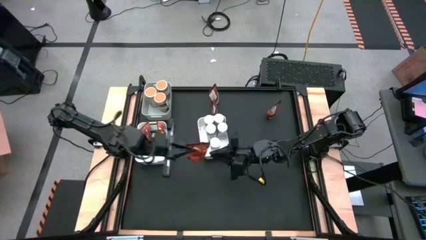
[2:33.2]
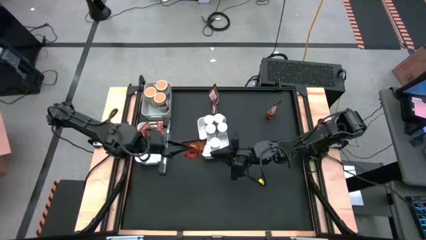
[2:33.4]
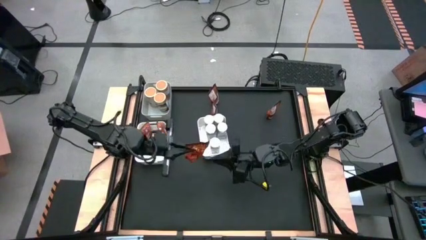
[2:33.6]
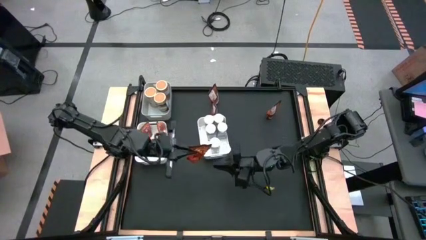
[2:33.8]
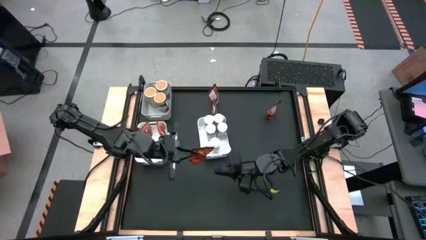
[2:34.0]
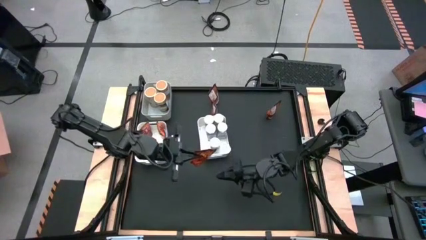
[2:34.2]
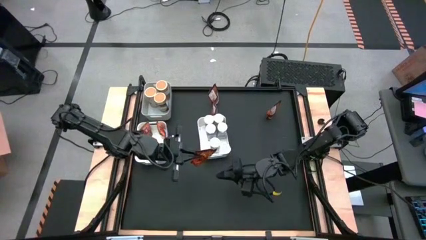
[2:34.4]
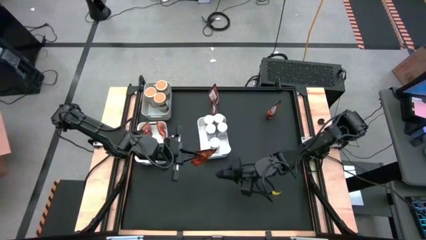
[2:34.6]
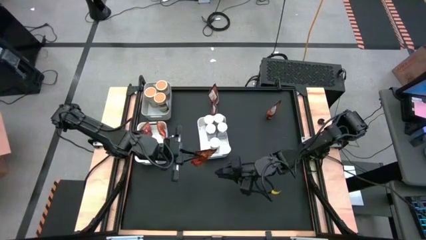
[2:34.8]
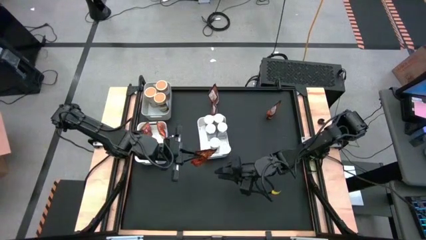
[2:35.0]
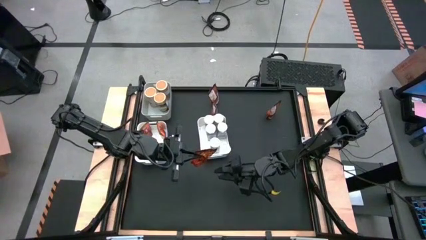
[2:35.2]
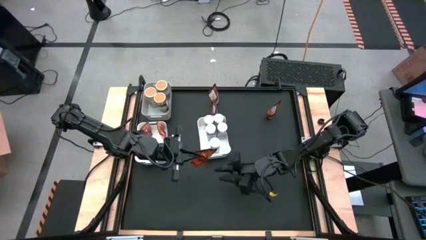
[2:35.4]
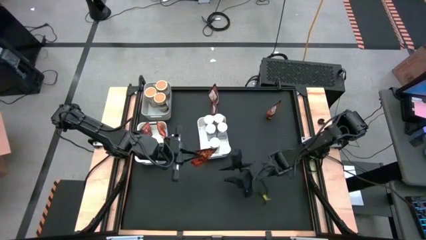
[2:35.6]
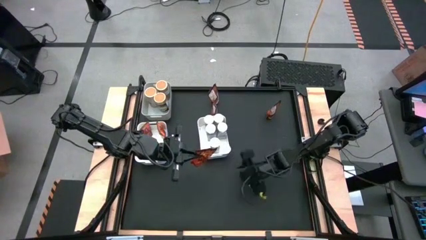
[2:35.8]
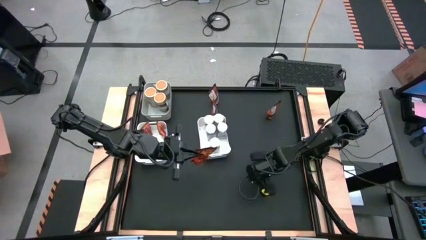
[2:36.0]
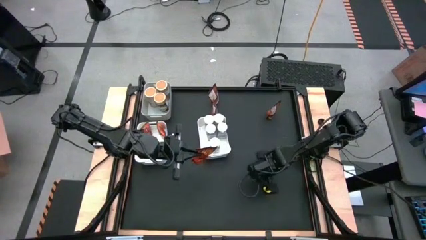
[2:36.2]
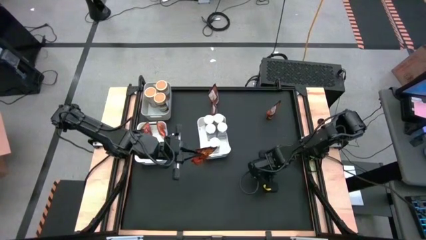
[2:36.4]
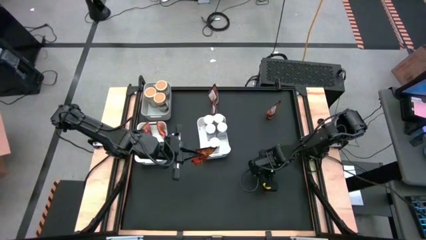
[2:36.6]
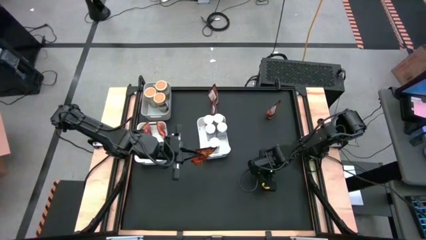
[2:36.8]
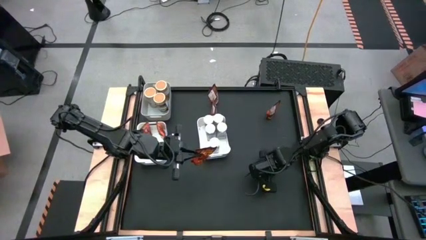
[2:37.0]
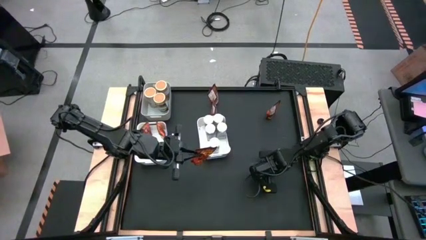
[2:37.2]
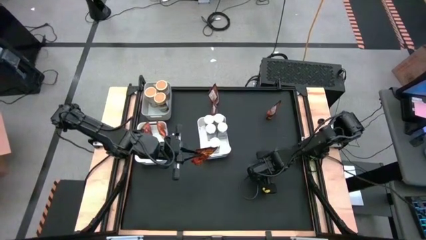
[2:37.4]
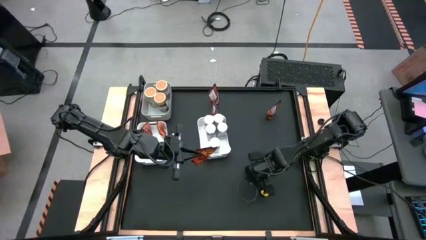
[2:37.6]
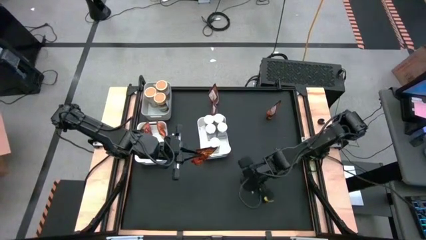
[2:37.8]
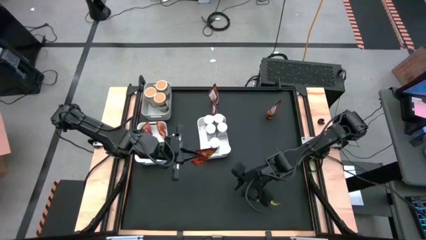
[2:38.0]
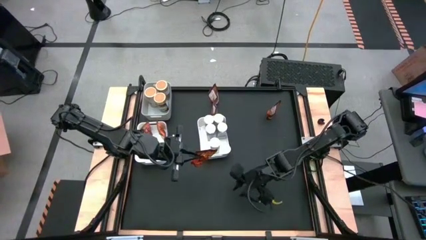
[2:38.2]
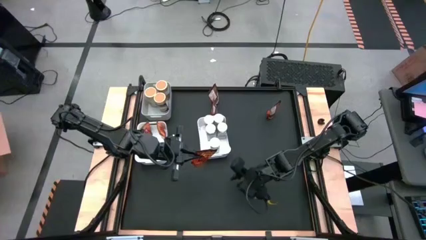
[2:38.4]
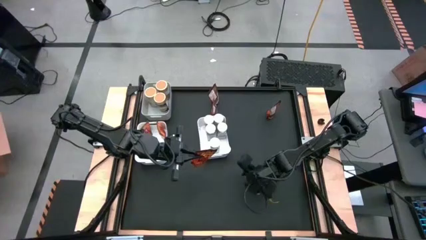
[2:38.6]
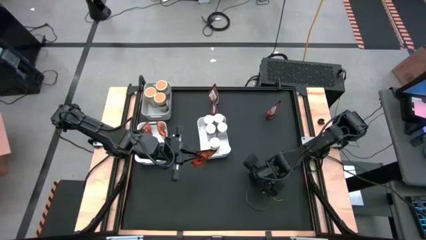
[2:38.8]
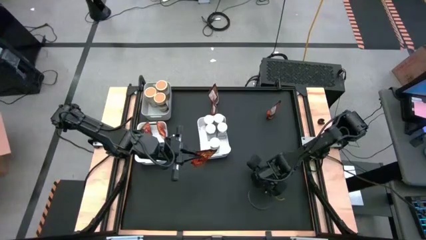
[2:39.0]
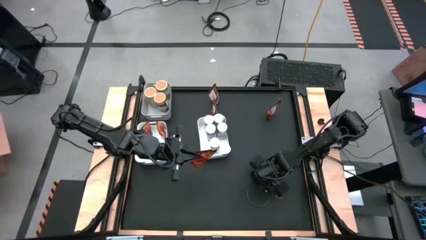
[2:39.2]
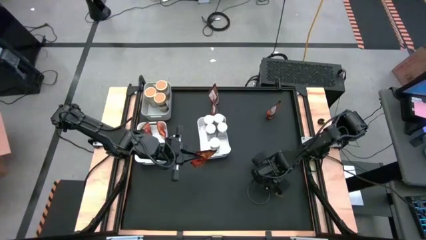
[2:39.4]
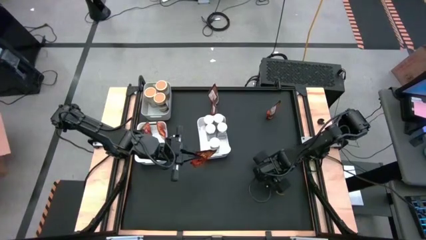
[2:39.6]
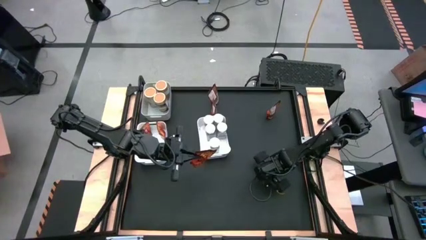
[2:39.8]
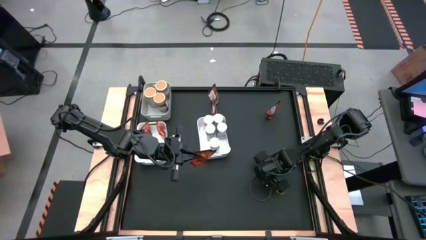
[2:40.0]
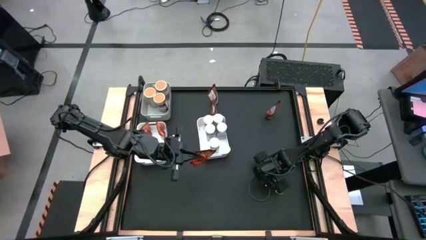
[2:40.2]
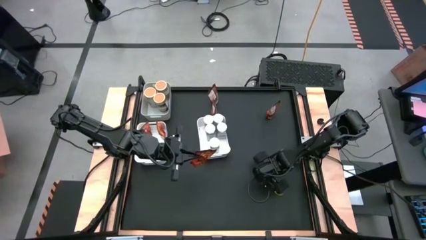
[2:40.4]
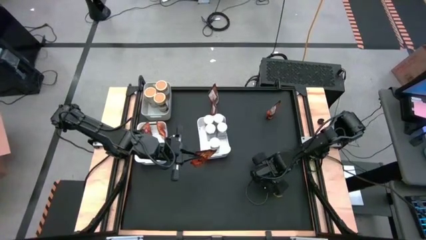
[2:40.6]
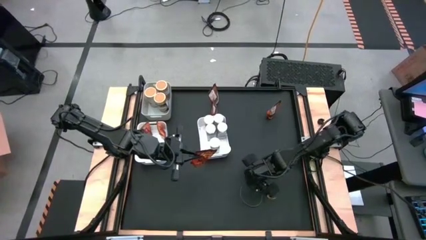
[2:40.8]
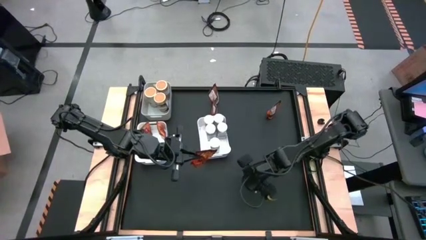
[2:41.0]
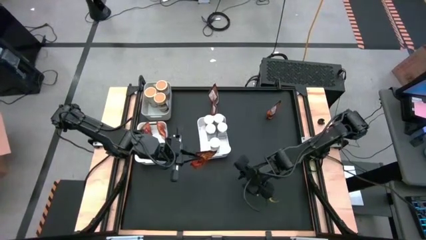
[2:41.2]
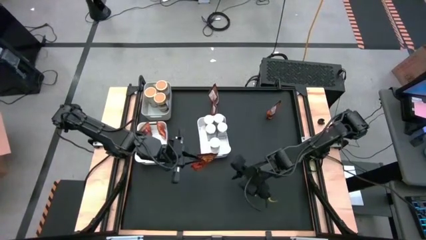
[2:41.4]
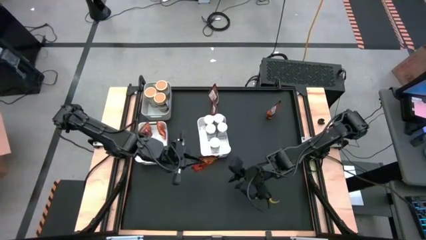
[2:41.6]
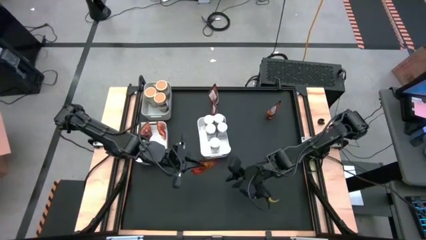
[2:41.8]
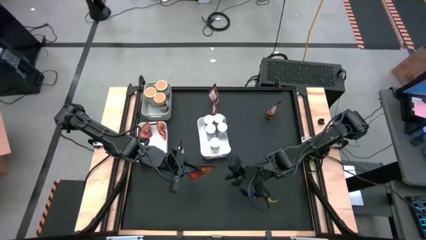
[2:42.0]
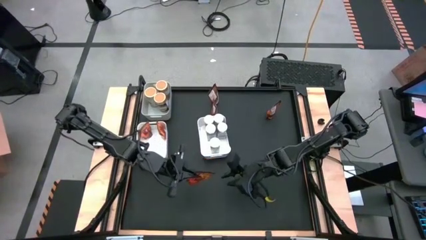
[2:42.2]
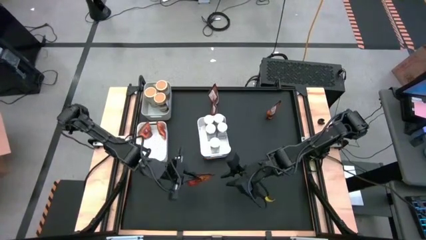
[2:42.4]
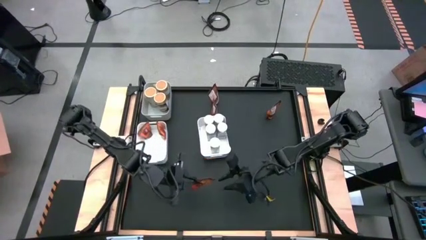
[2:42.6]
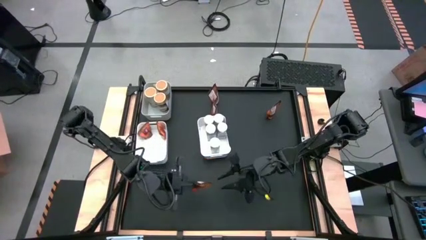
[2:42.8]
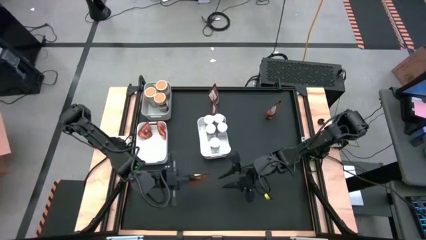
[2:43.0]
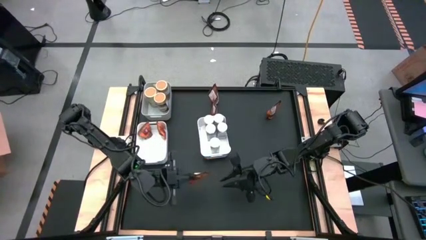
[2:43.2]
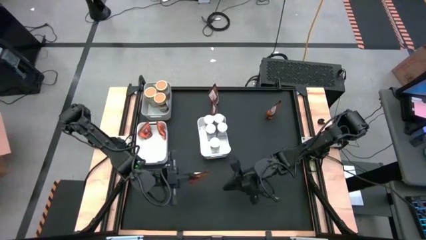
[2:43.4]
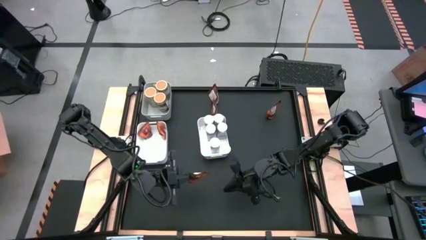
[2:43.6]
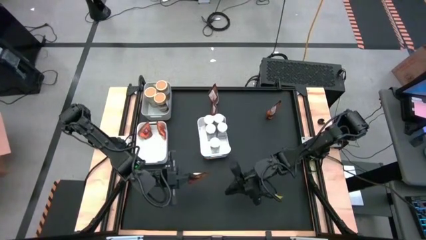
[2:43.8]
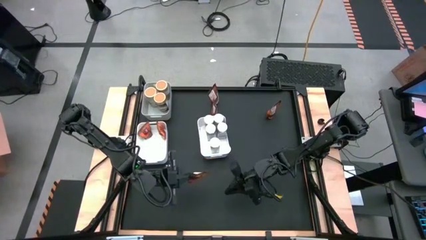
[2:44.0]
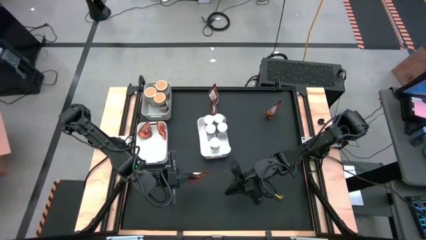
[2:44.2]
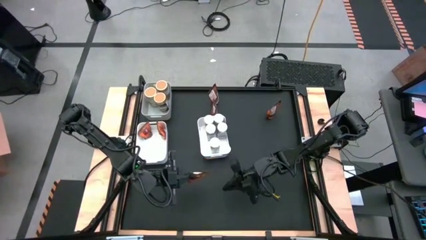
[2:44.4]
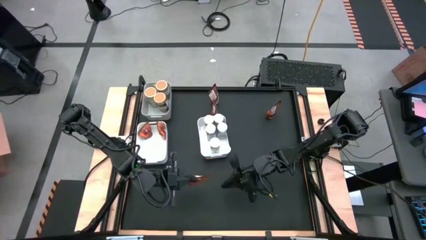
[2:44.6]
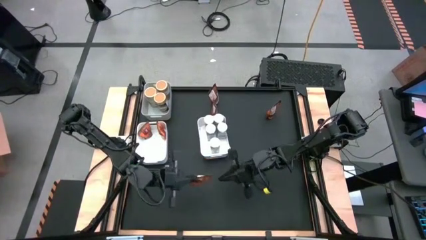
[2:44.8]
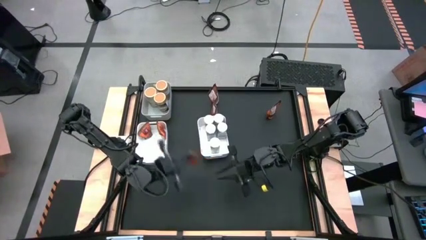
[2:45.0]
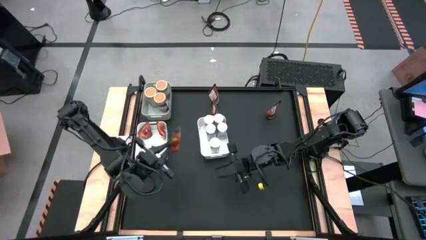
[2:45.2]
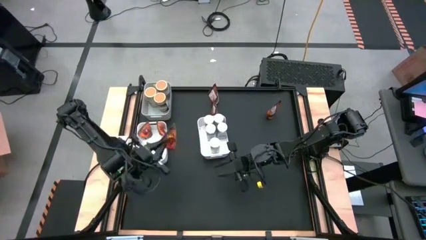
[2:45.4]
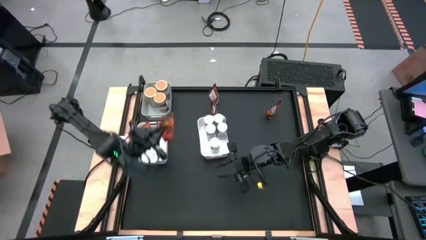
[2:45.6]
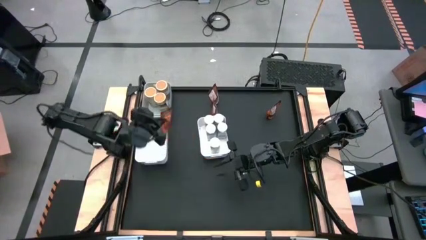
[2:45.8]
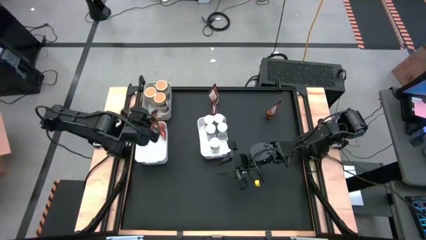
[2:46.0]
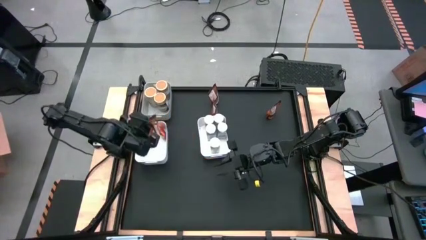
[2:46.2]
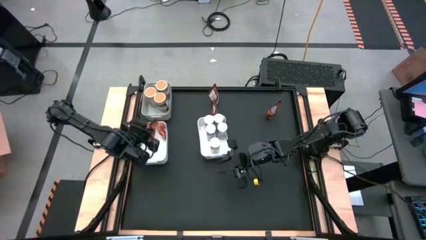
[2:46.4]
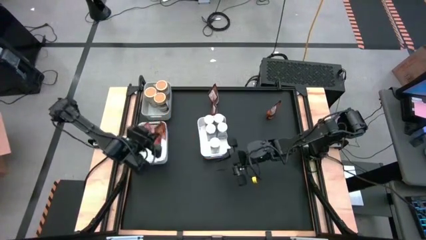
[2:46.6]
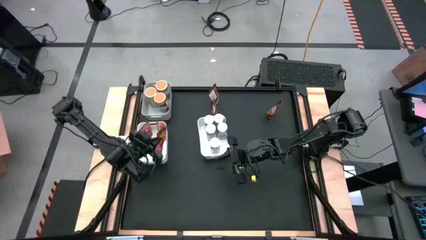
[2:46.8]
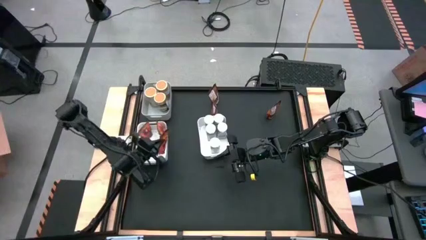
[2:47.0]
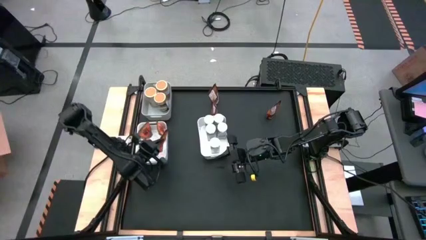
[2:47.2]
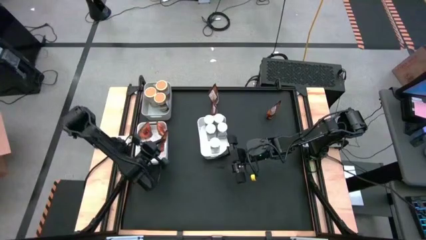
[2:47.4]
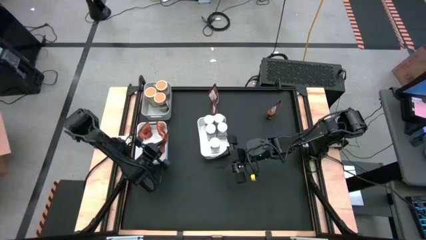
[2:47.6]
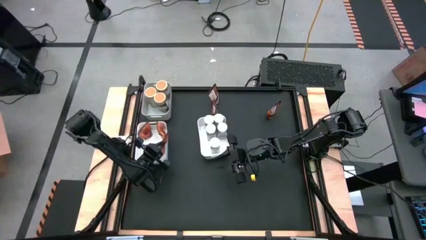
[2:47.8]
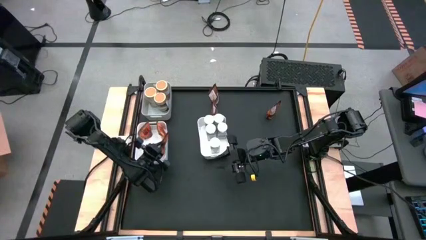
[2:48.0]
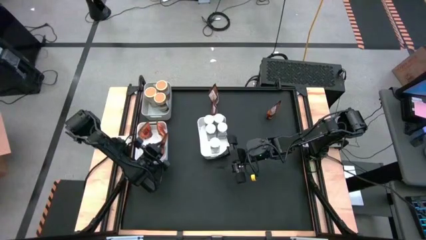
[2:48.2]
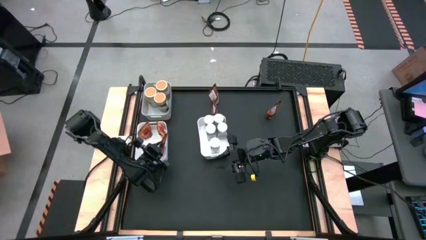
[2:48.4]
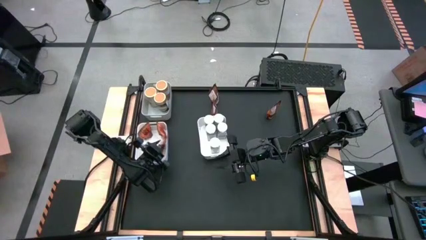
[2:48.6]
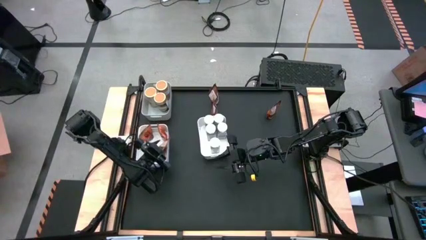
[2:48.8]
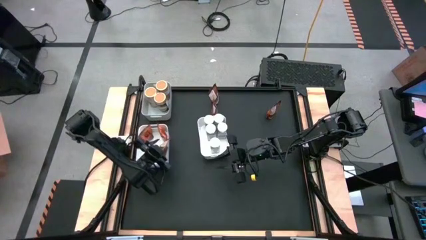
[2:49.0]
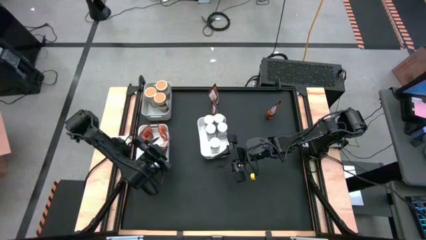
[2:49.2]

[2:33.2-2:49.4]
Task: Sort spices by type
Put the orange seasoning pack into the left white bin
